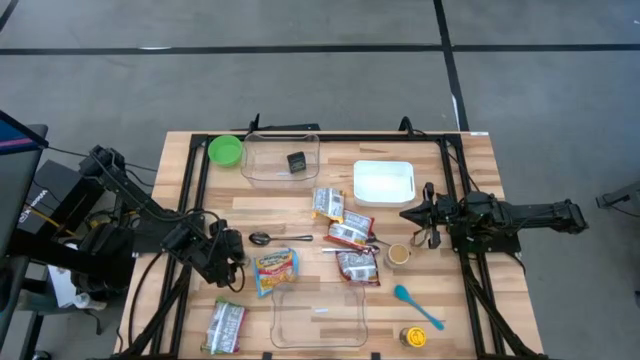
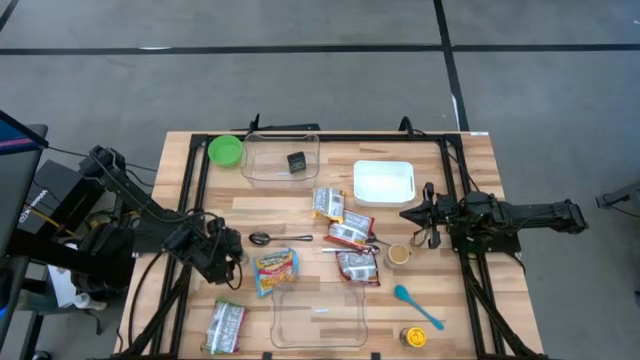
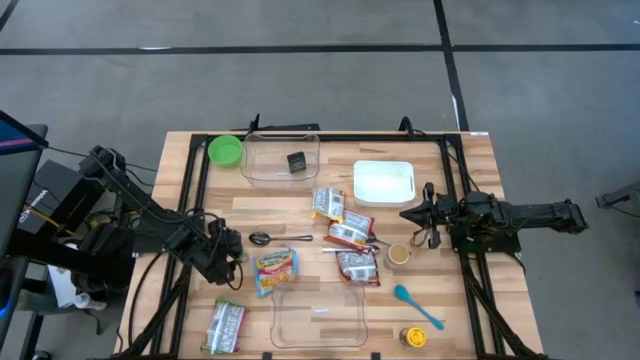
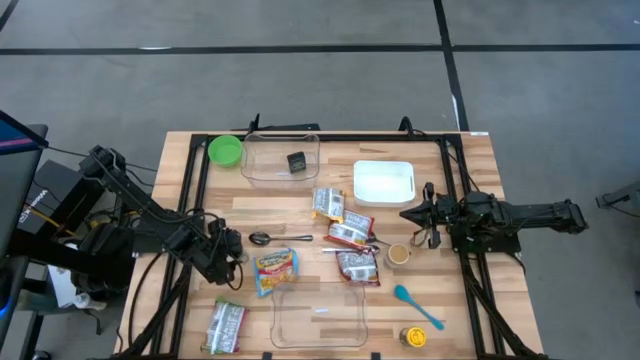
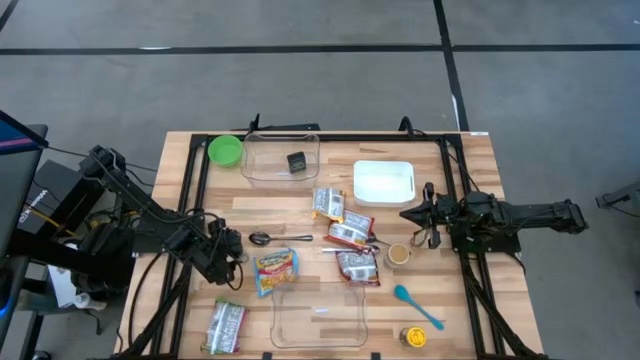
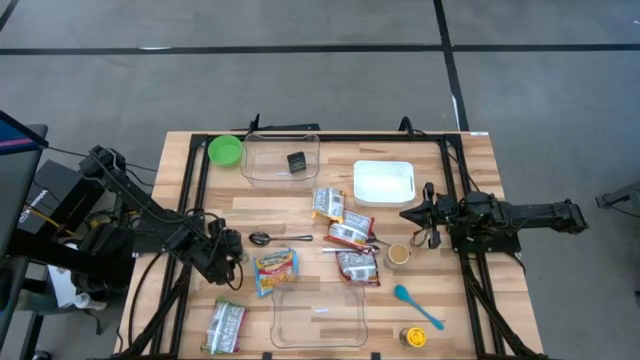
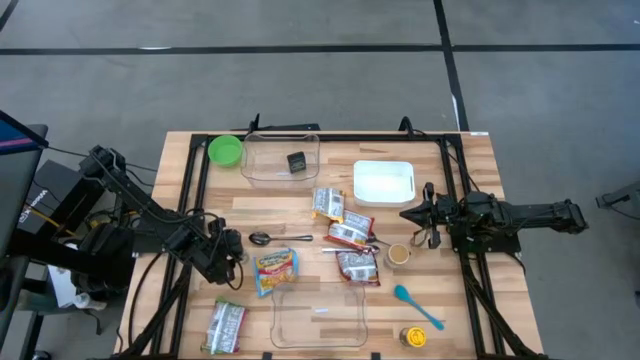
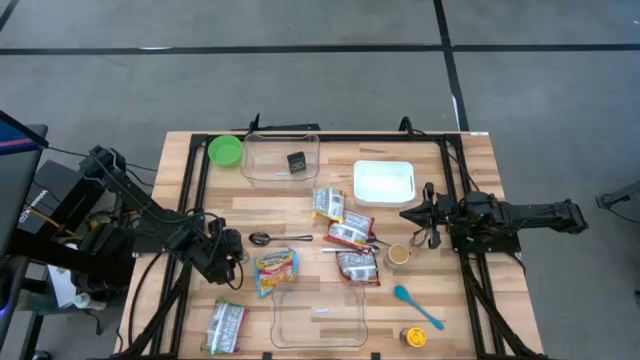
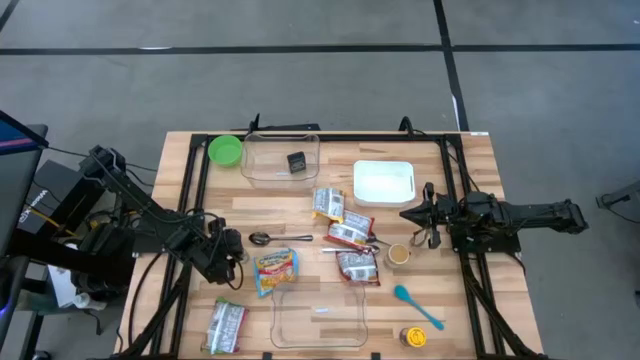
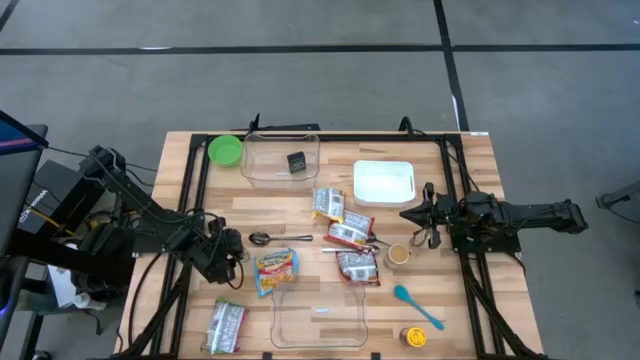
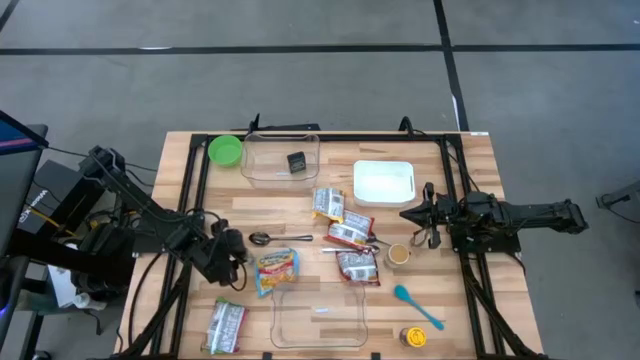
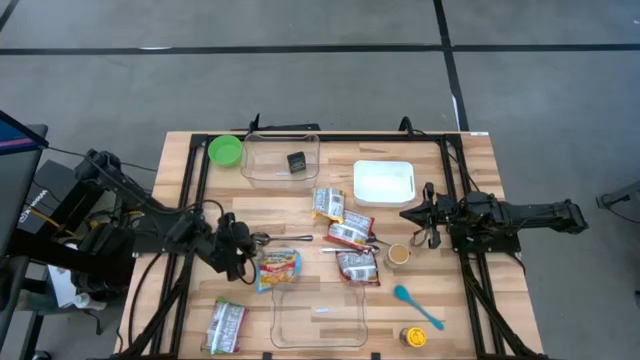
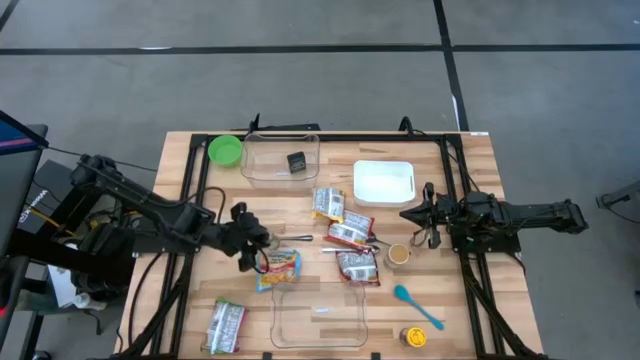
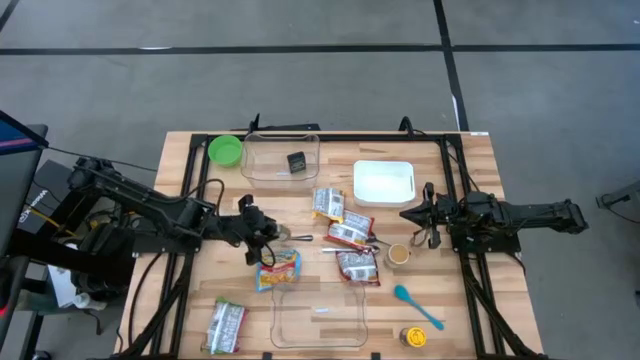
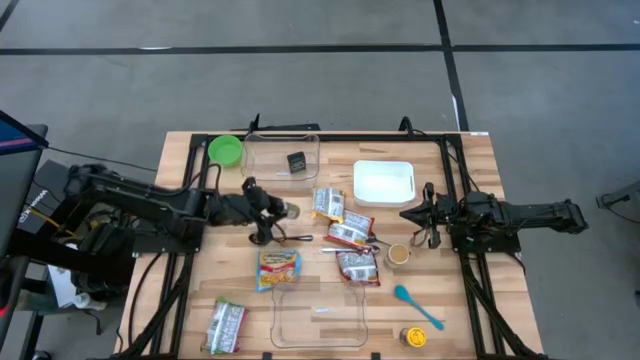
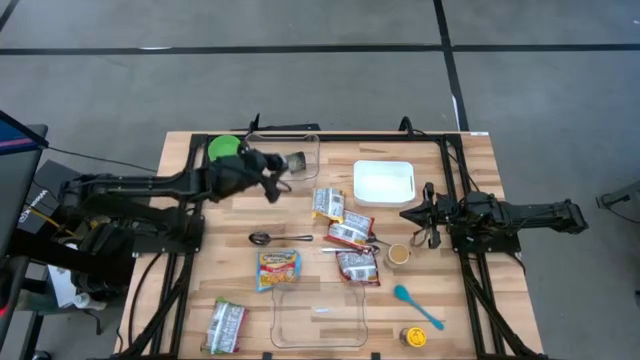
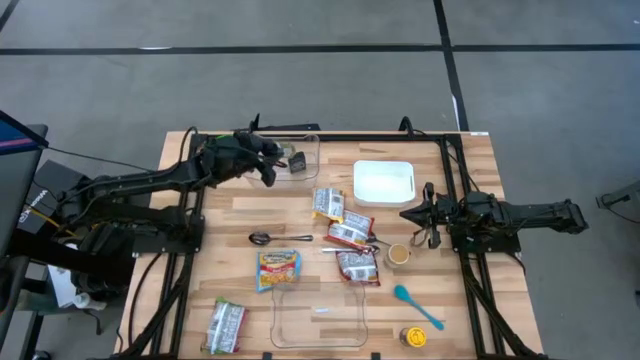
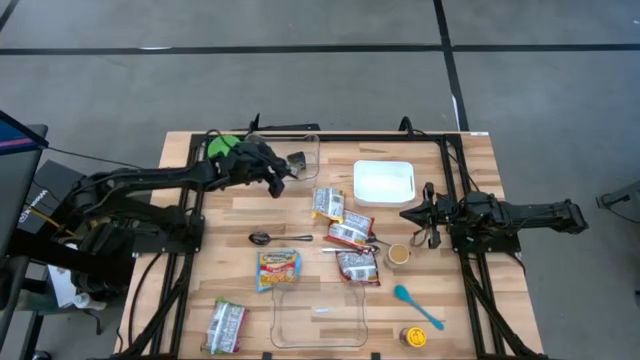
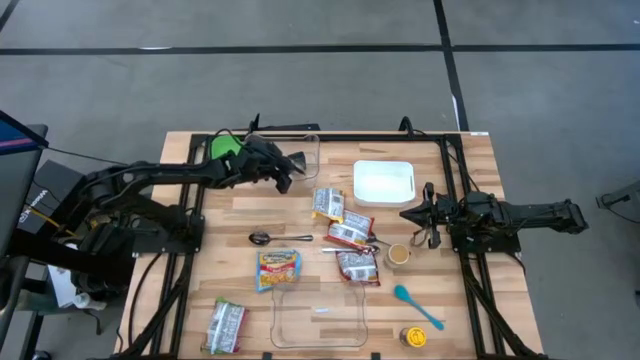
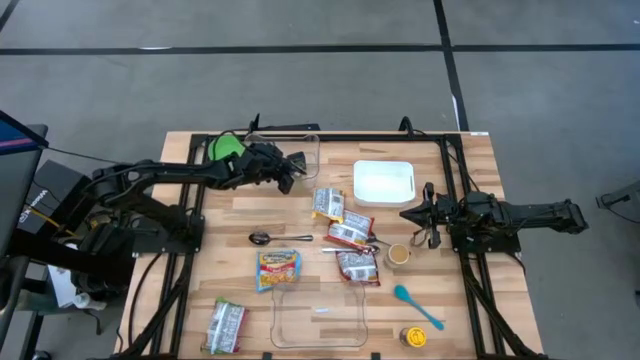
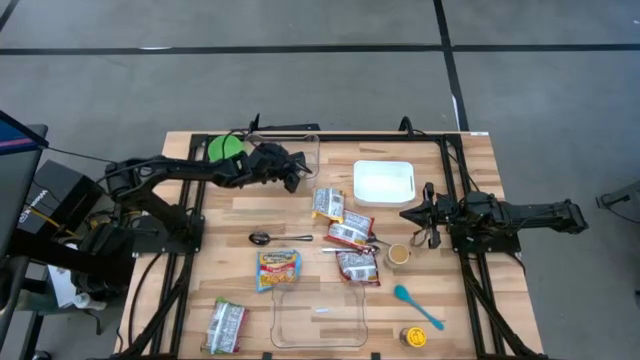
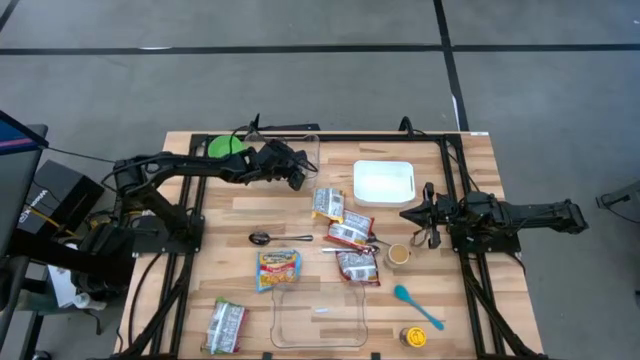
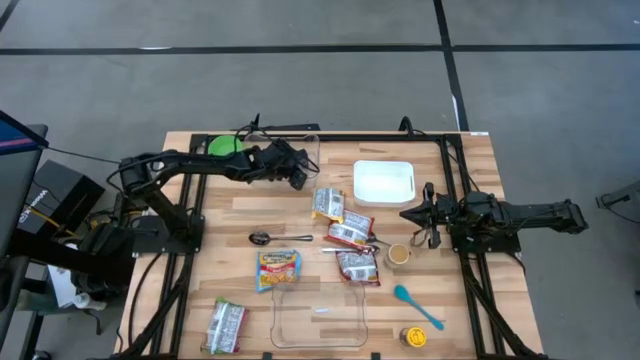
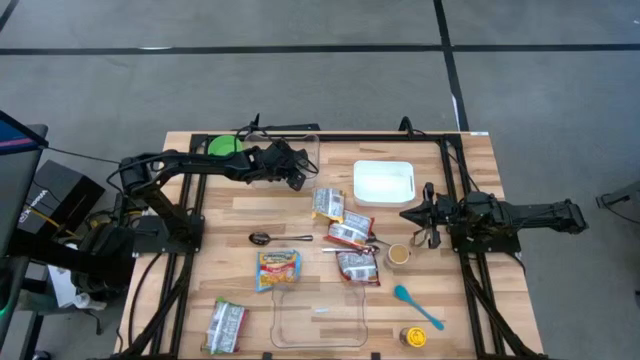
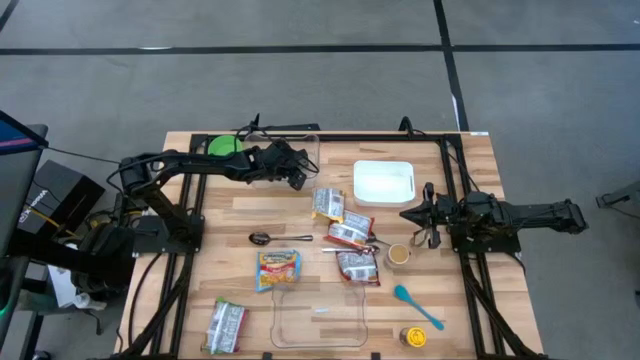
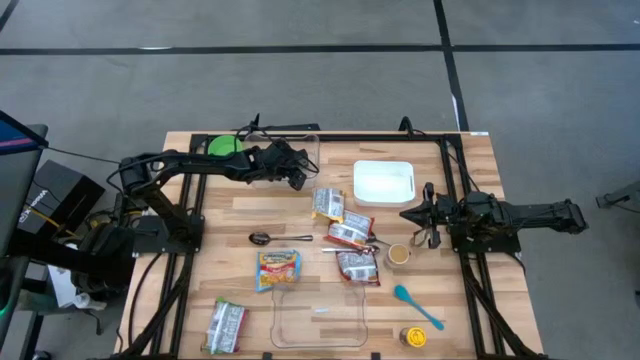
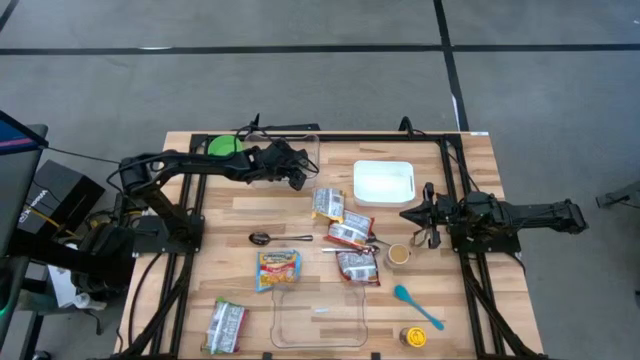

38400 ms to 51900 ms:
Task: Pick & Place Food Item
Put the green seasoning bottle into the top transparent bin

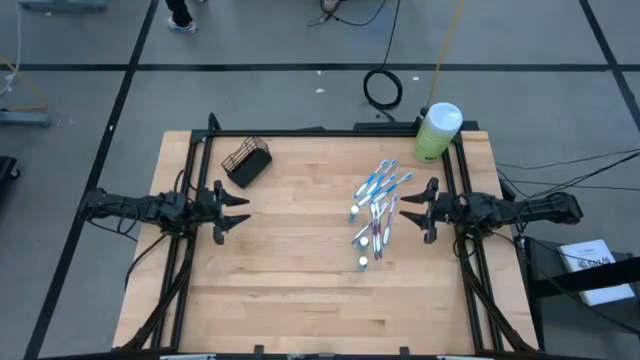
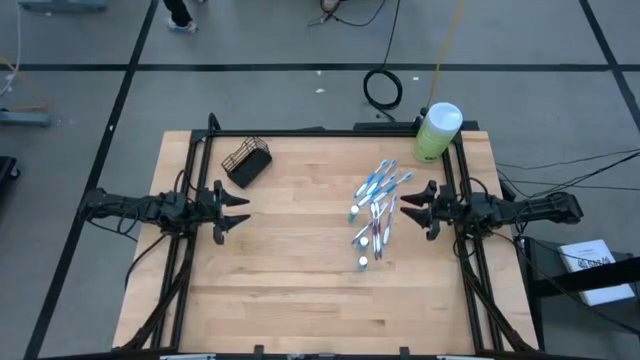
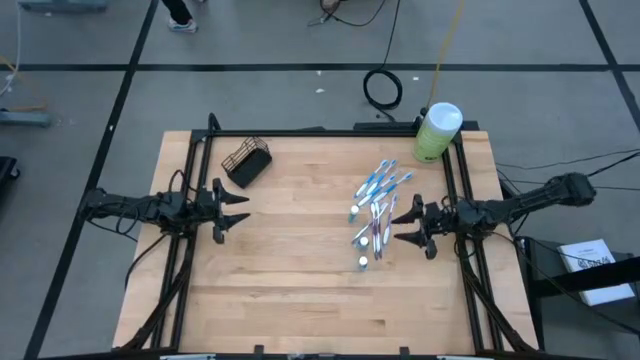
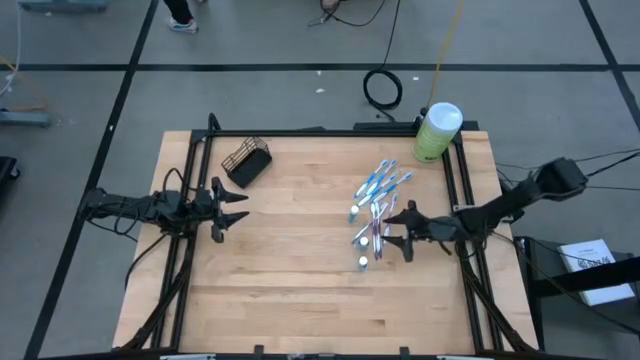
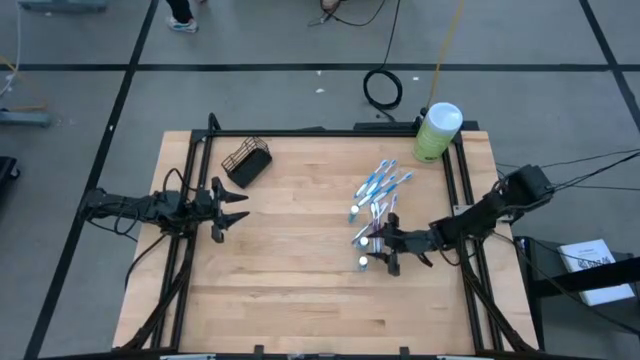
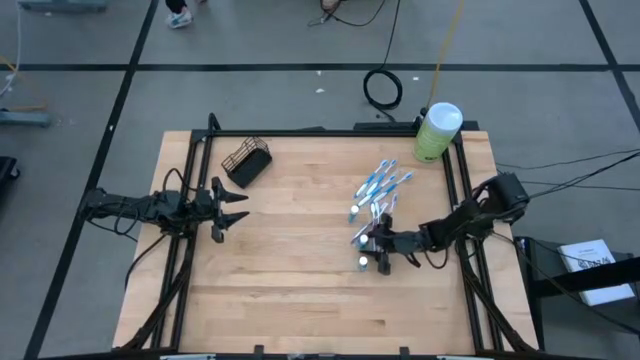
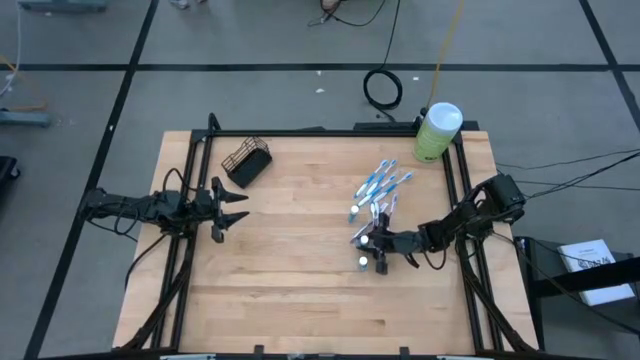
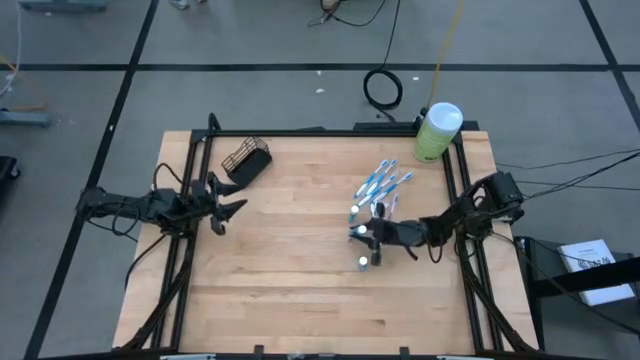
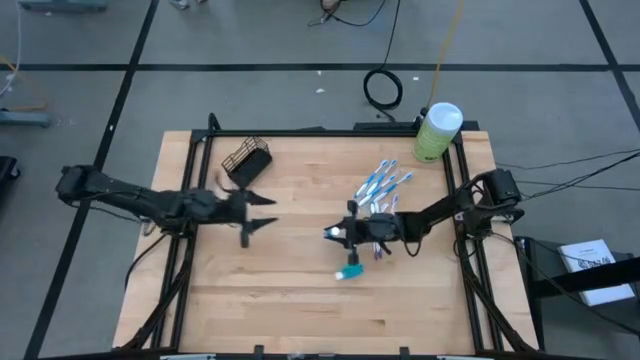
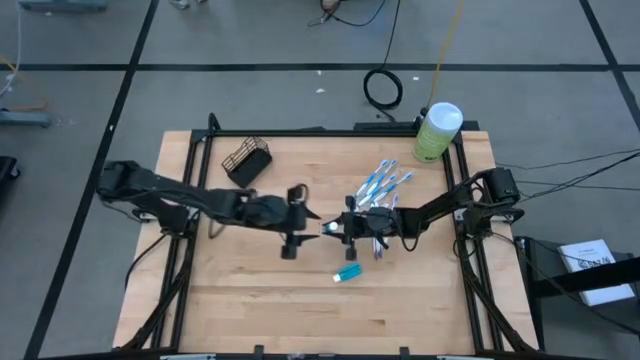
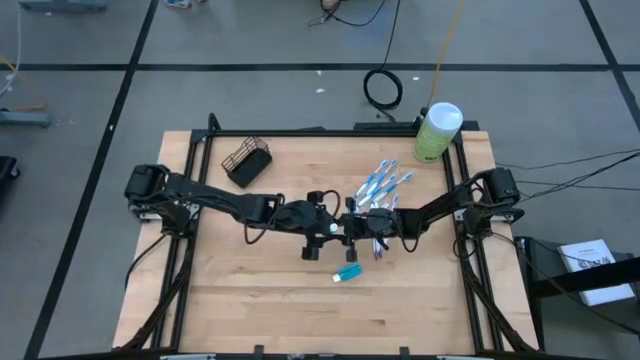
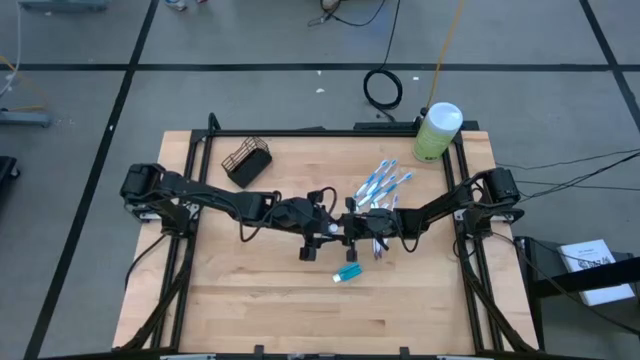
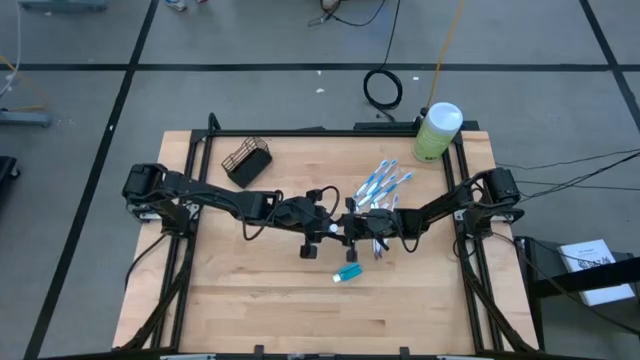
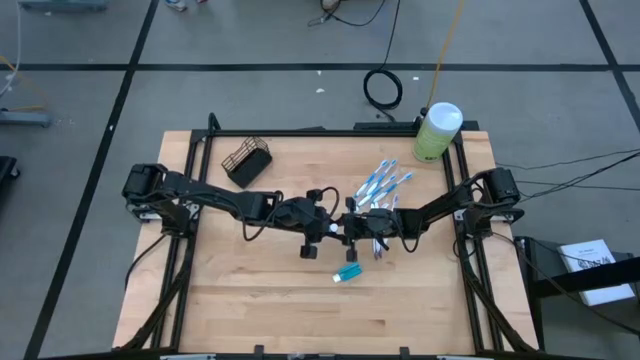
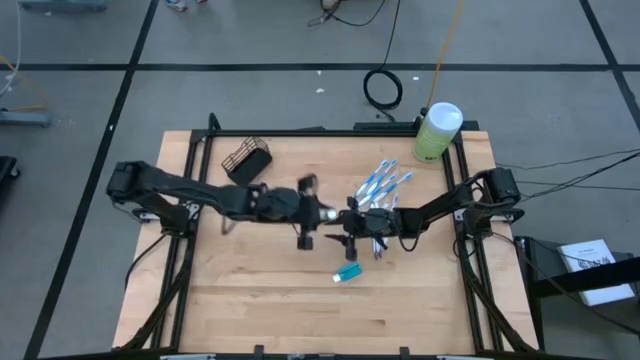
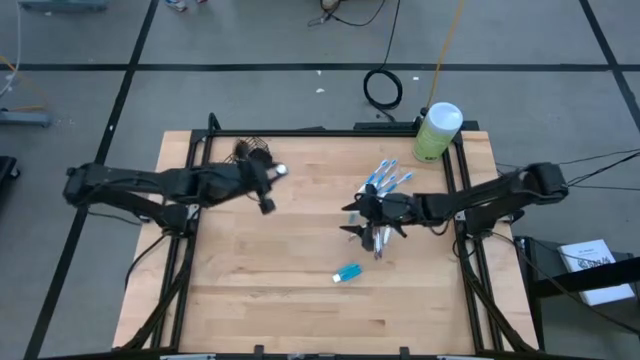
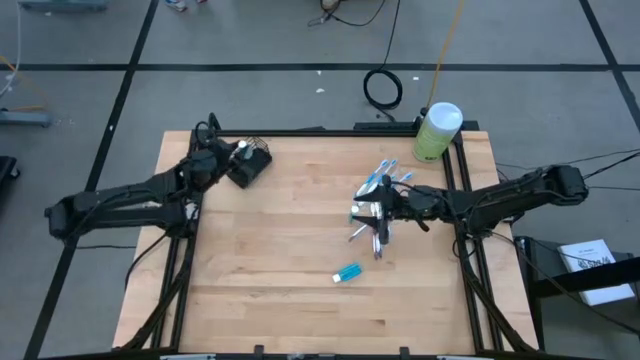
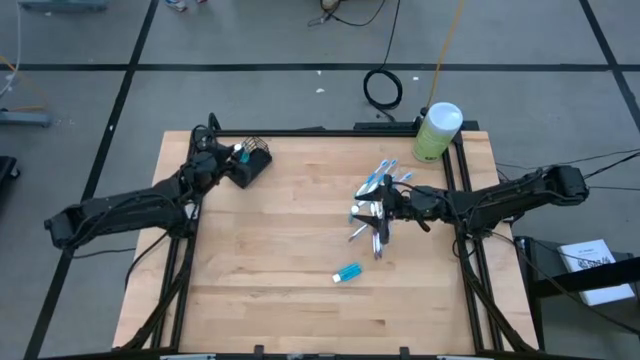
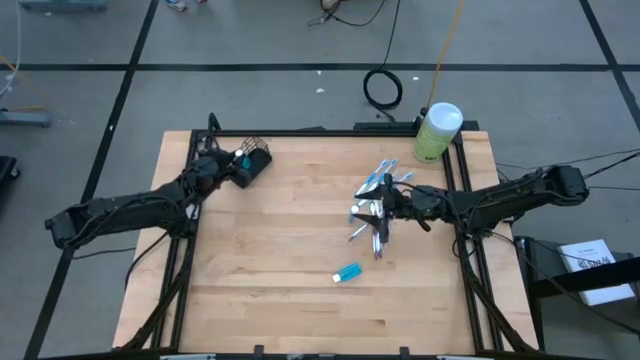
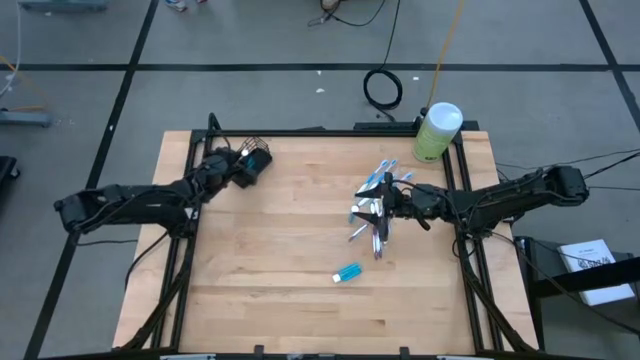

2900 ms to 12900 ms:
Task: Pick & Place toothbrushing station
Put the middle mouthwash into the middle compartment of the wire organizer
